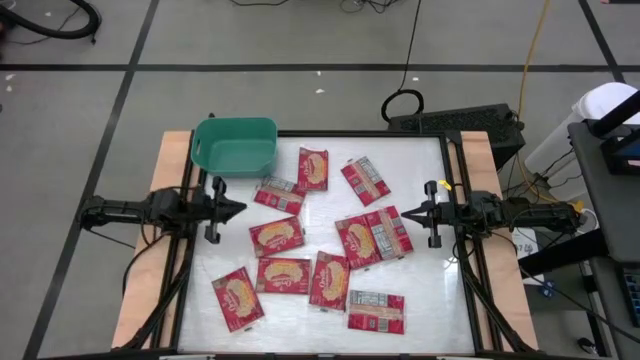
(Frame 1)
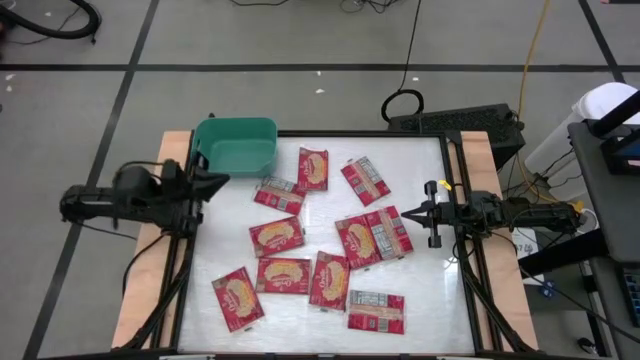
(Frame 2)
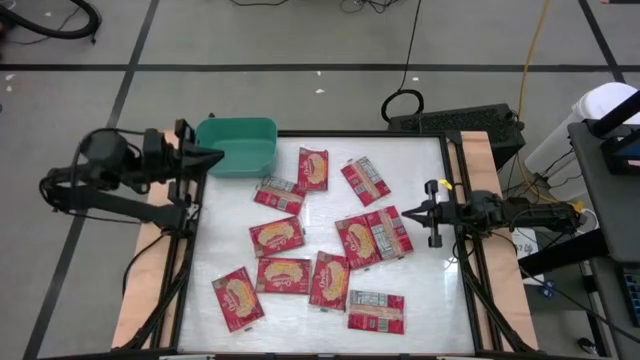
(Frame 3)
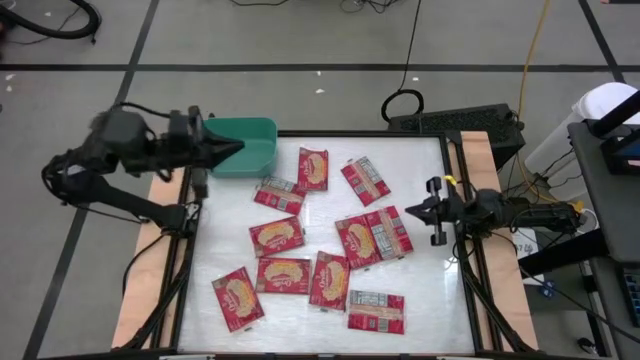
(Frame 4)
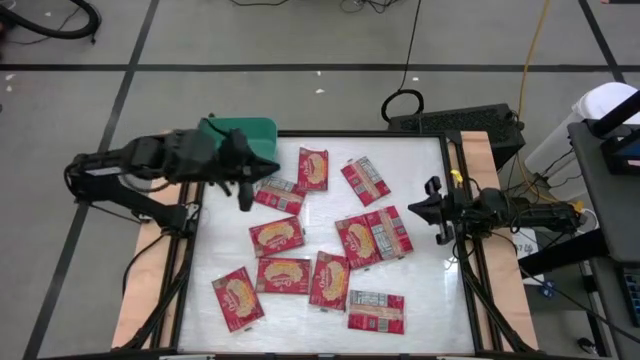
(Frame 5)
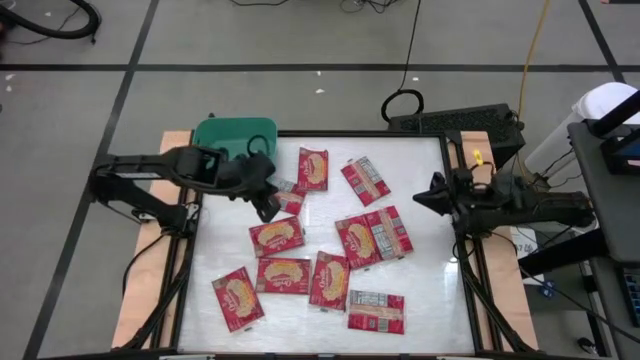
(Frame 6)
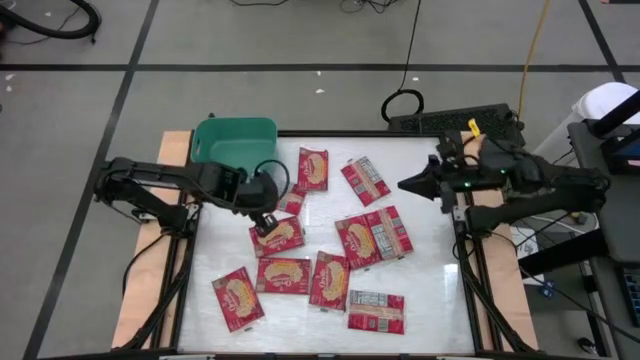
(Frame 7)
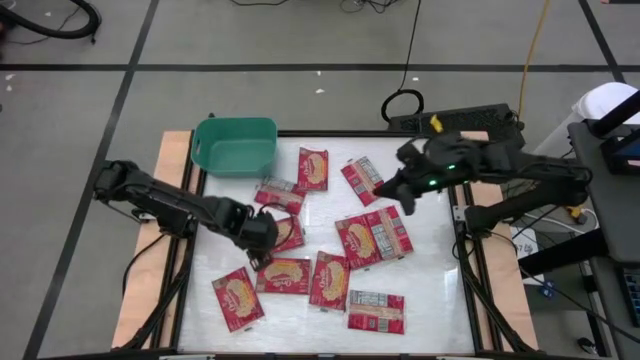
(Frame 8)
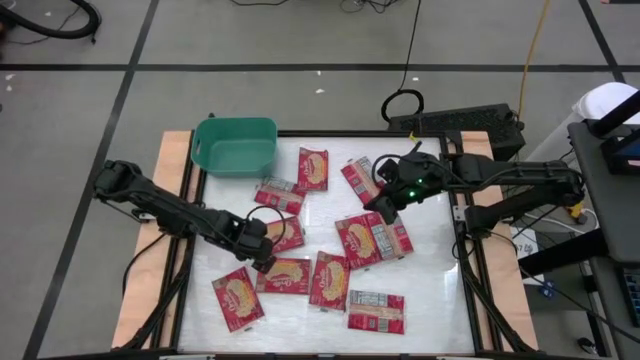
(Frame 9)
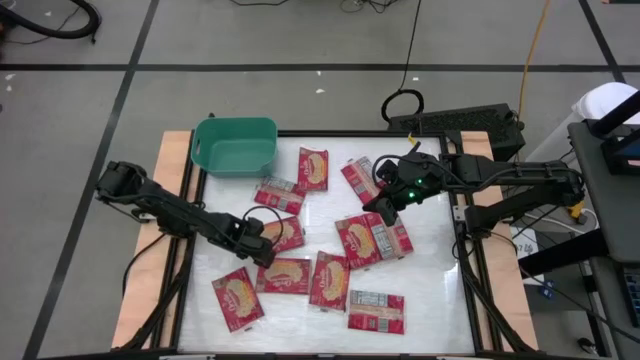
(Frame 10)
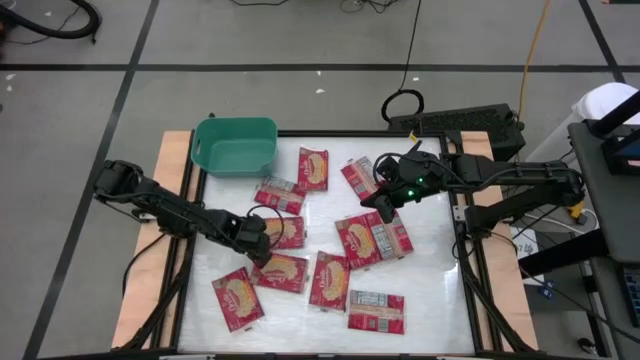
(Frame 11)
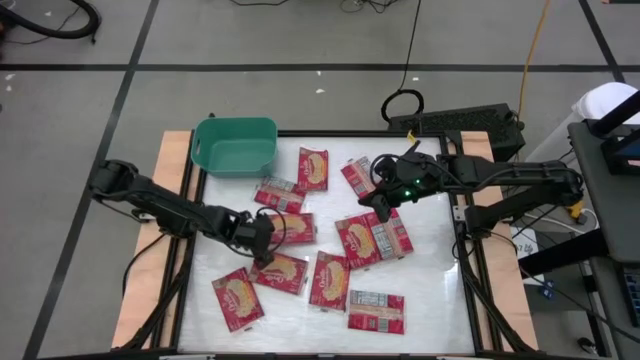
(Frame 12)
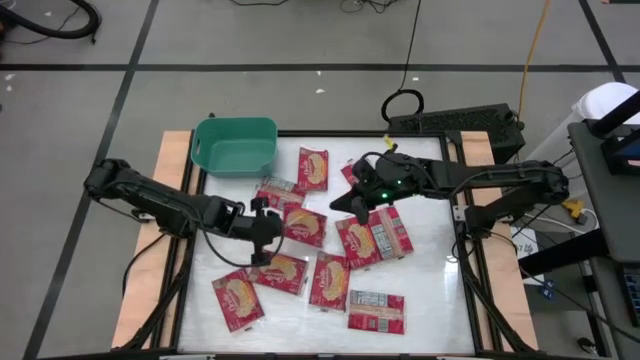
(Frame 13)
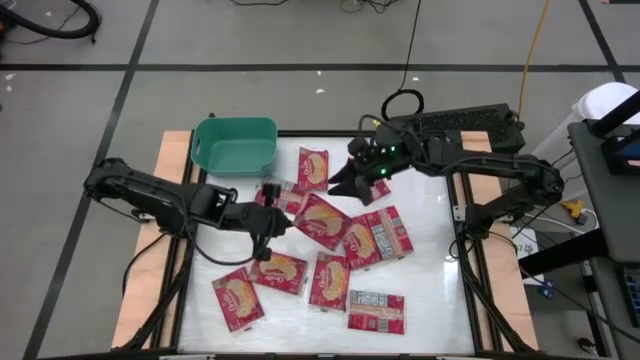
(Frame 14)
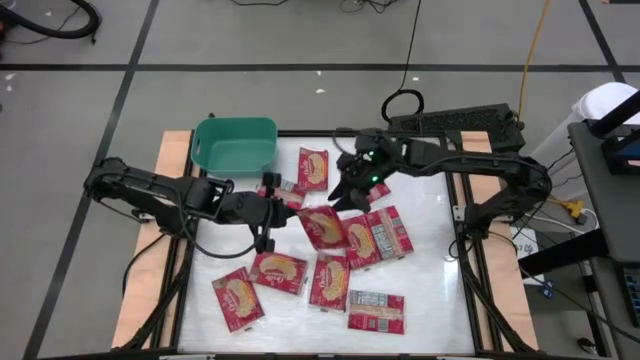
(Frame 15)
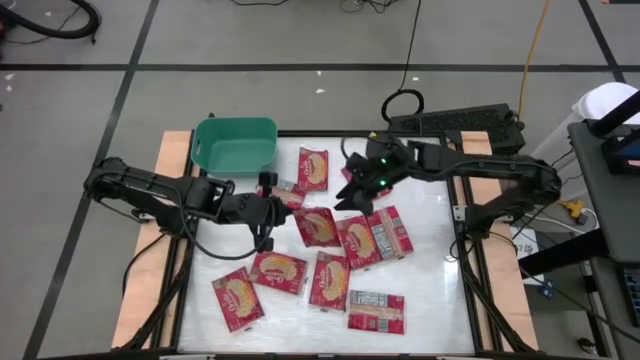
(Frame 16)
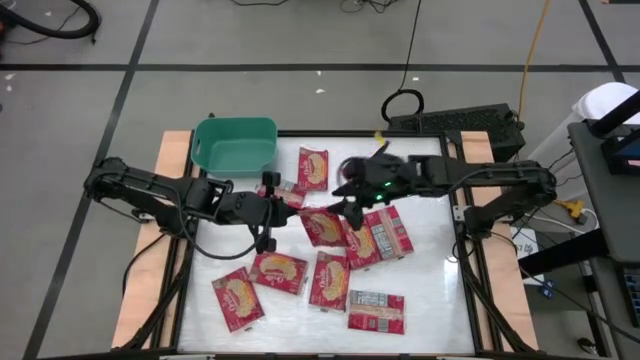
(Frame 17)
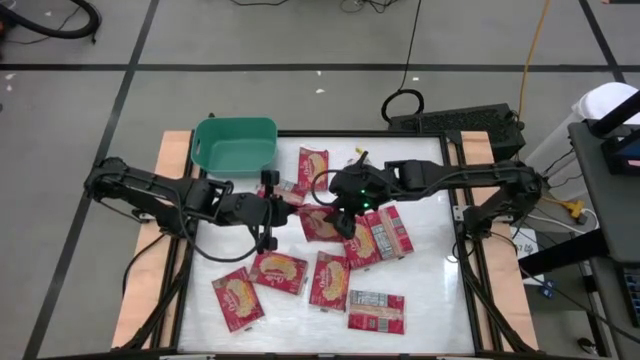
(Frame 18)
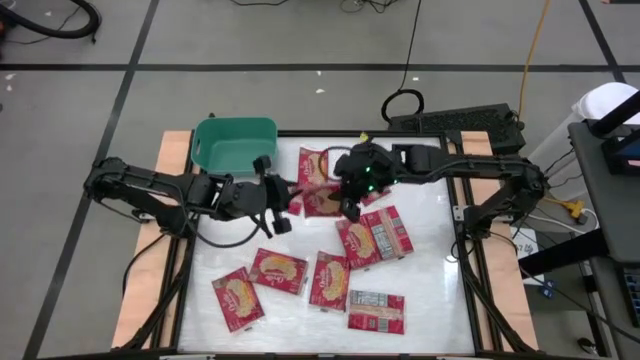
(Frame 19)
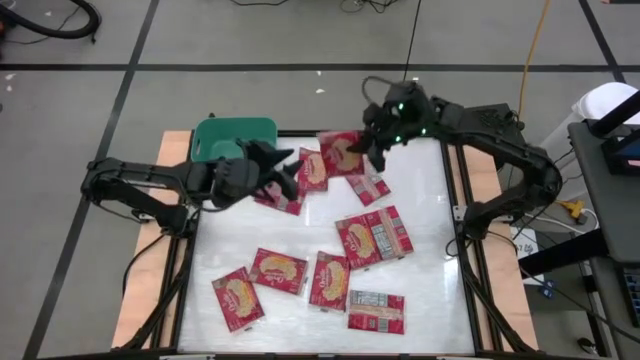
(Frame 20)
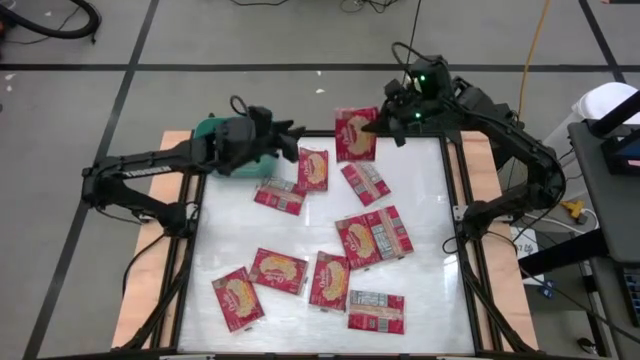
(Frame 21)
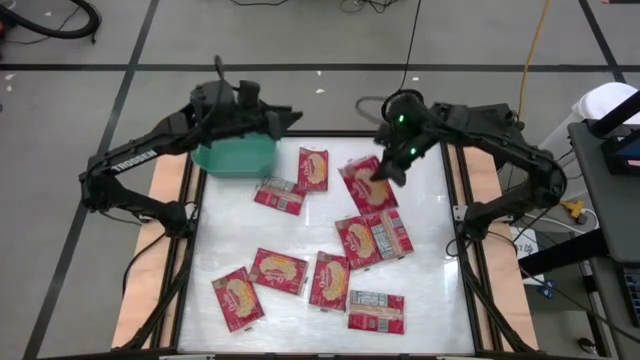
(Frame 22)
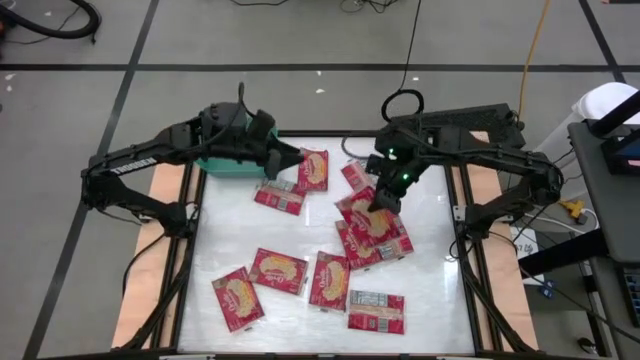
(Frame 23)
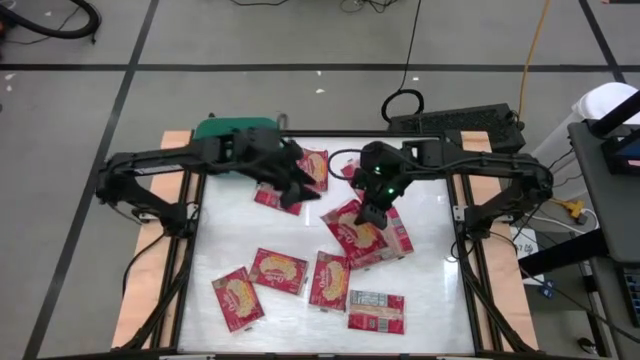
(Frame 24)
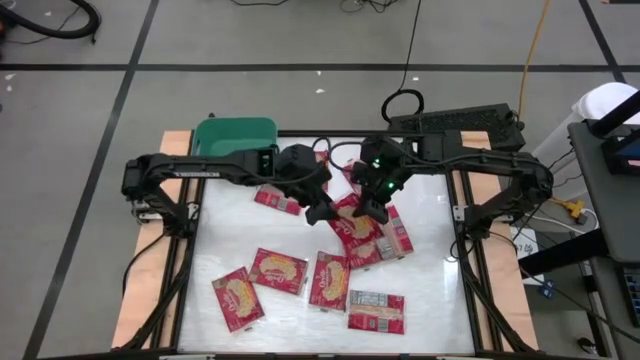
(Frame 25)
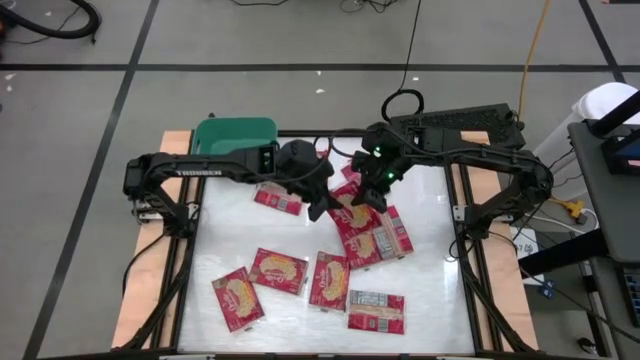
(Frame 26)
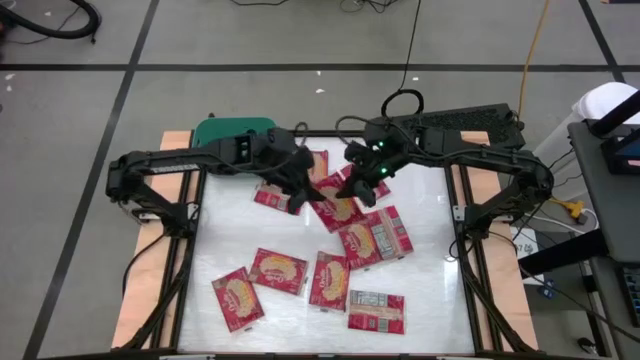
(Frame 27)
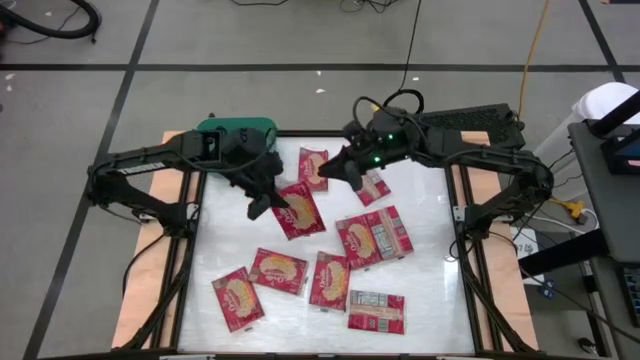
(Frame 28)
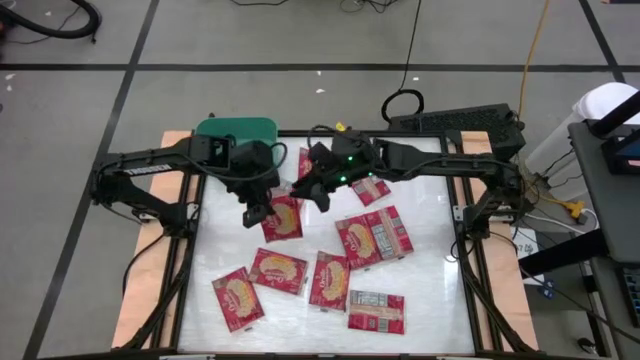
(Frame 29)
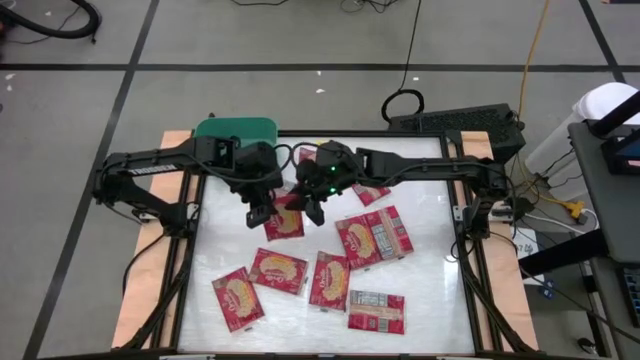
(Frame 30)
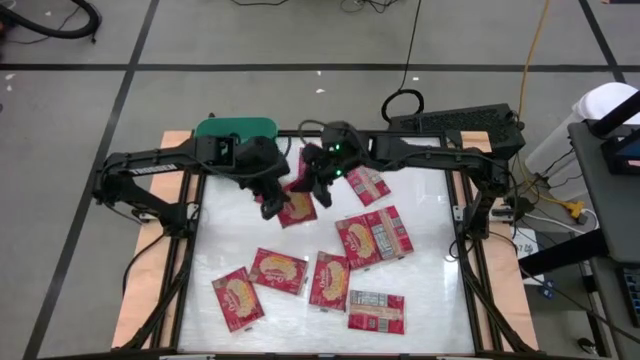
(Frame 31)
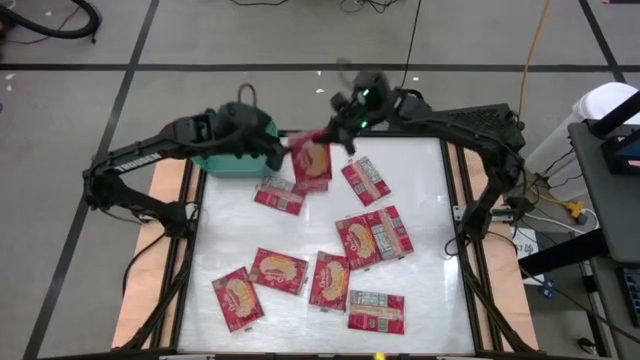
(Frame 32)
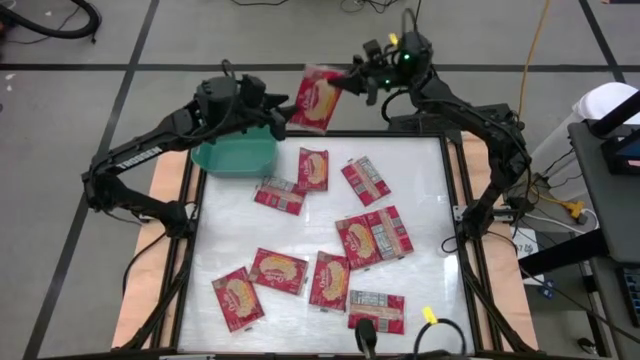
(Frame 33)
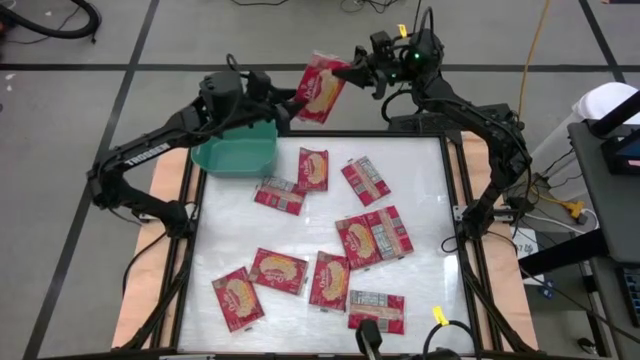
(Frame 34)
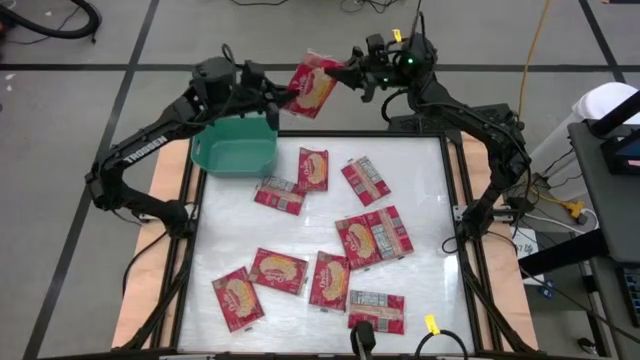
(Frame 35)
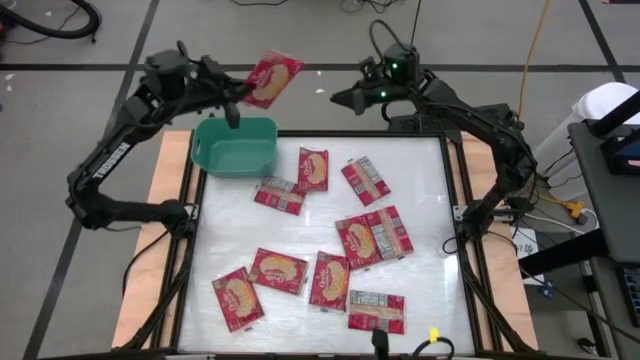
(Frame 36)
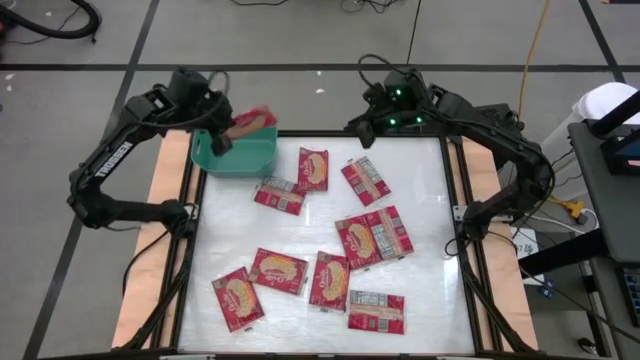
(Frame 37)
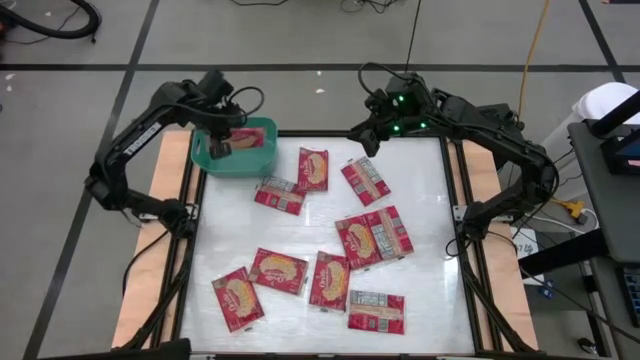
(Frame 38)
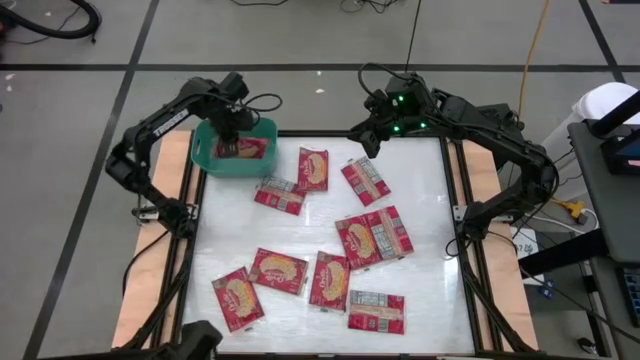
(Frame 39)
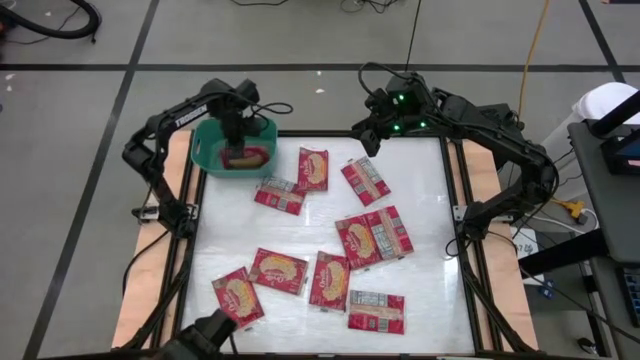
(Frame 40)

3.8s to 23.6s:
Task: Sort popcorn bags into baskets
Put the red popcorn bag into the green bin

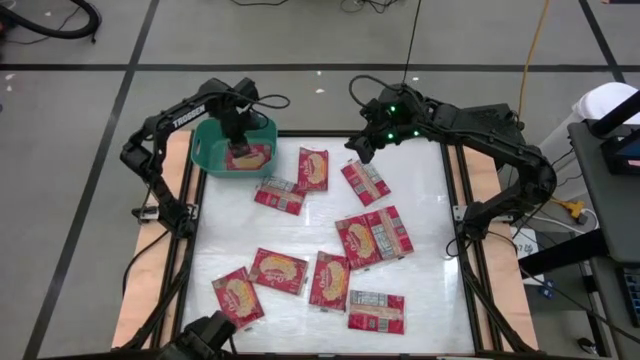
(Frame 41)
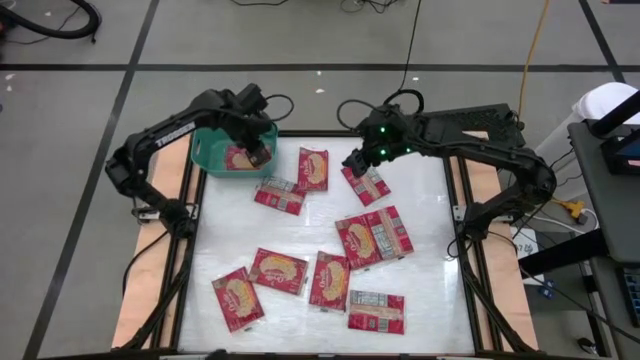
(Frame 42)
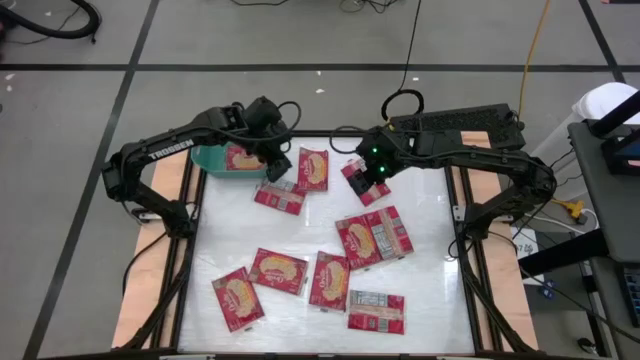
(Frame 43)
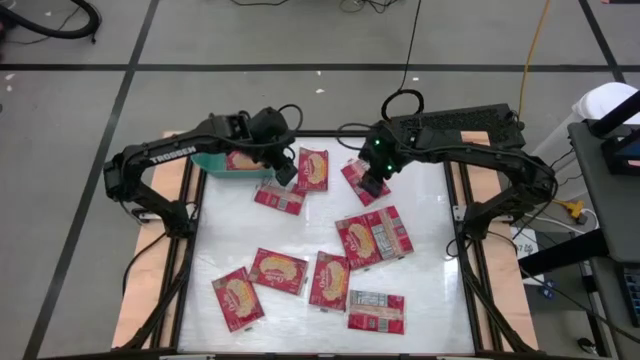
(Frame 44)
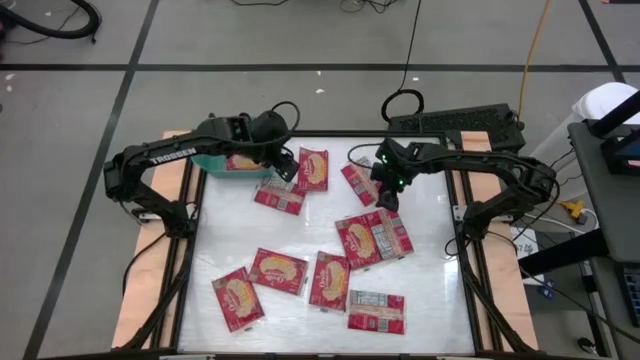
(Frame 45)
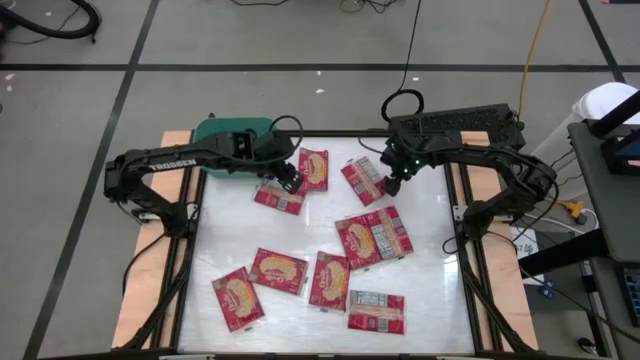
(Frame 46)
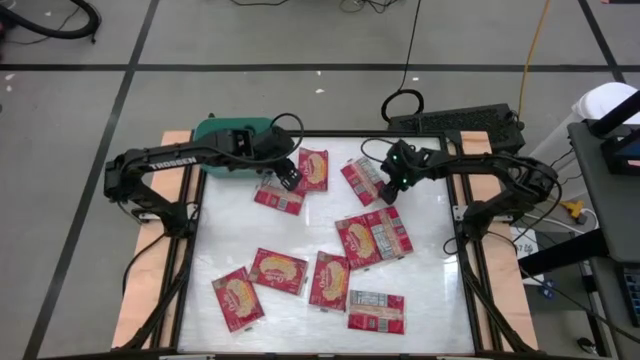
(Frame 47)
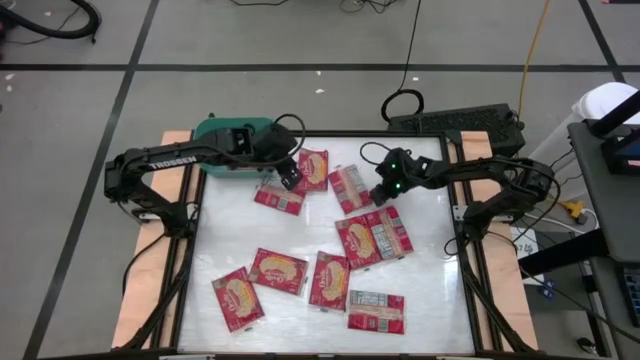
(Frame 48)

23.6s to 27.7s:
Put the red popcorn bag into the green bin
